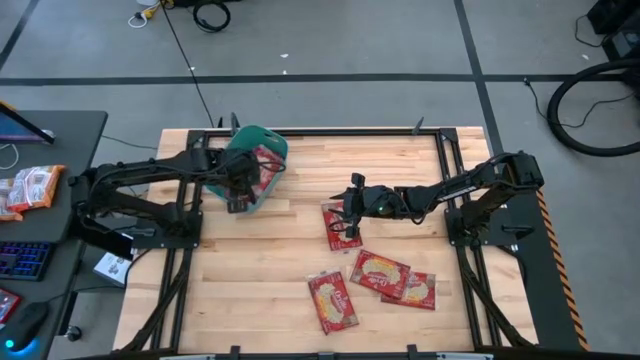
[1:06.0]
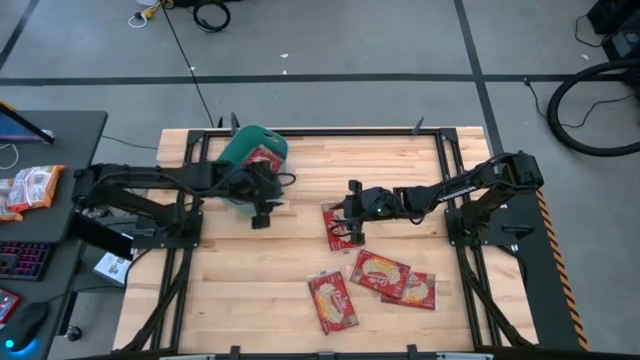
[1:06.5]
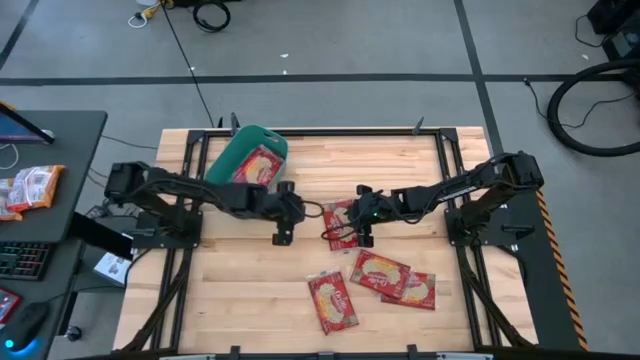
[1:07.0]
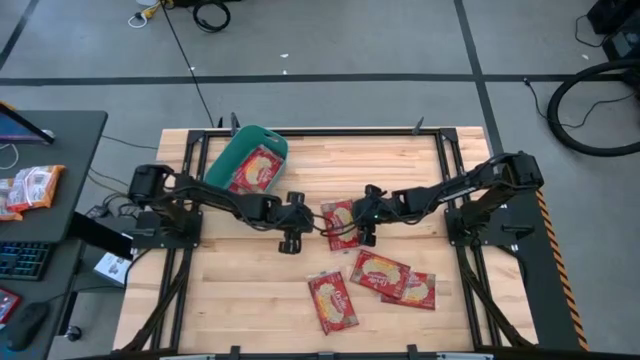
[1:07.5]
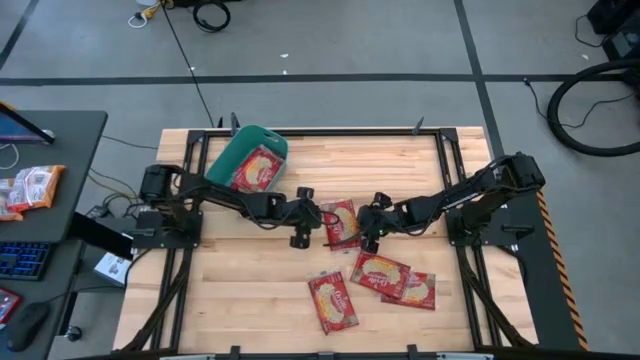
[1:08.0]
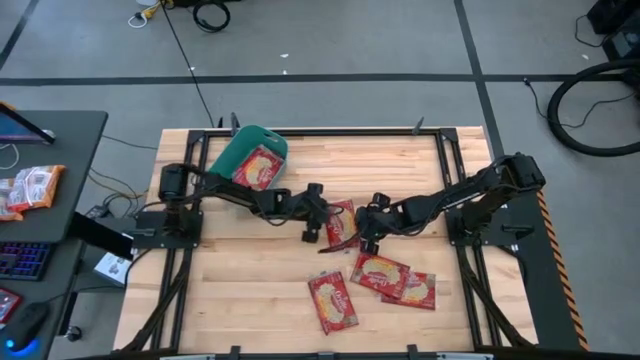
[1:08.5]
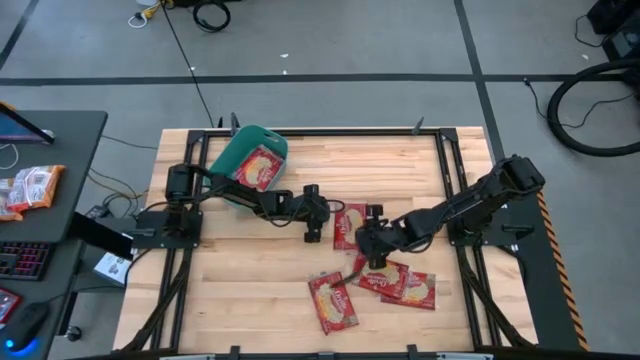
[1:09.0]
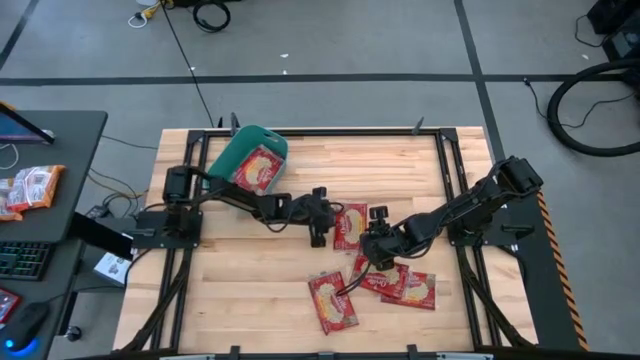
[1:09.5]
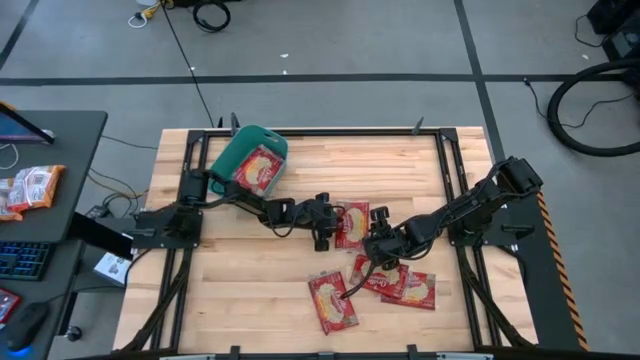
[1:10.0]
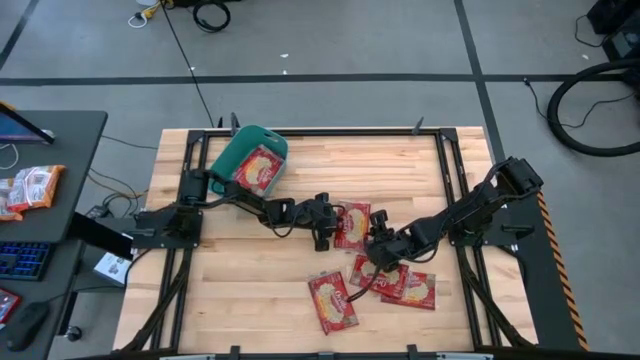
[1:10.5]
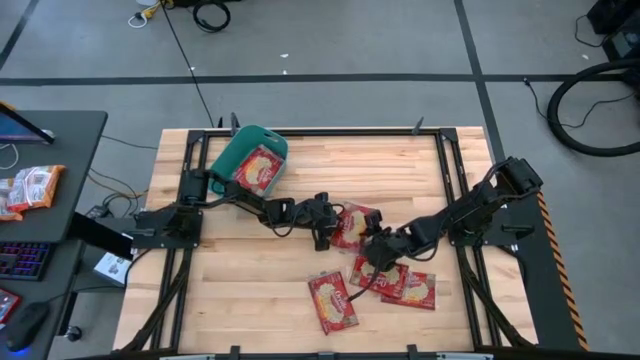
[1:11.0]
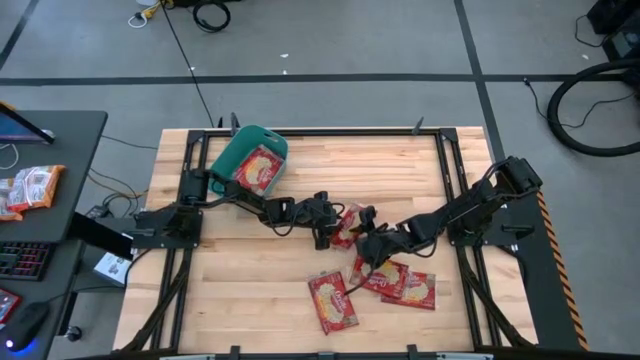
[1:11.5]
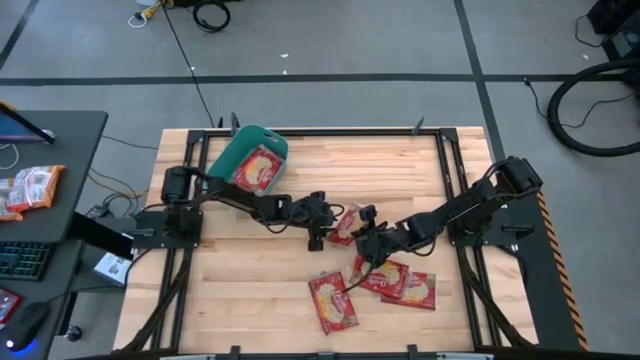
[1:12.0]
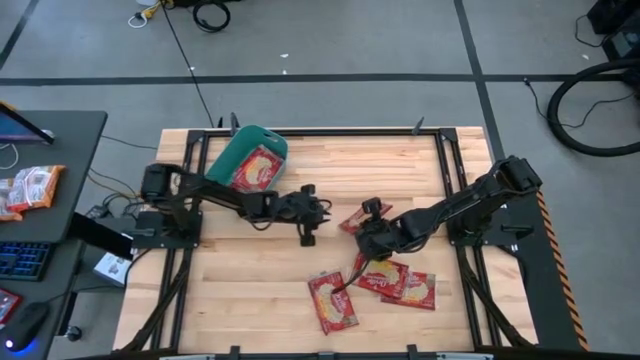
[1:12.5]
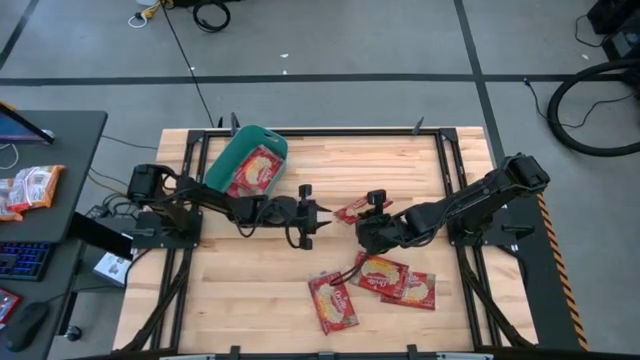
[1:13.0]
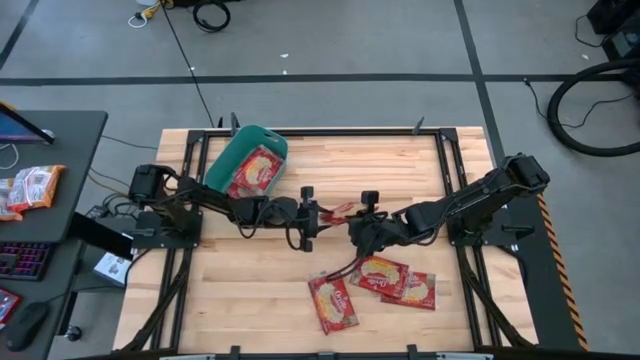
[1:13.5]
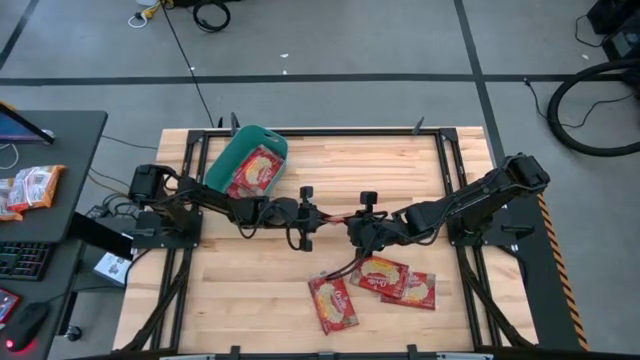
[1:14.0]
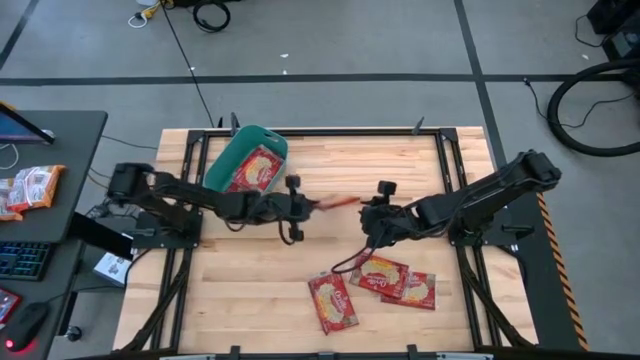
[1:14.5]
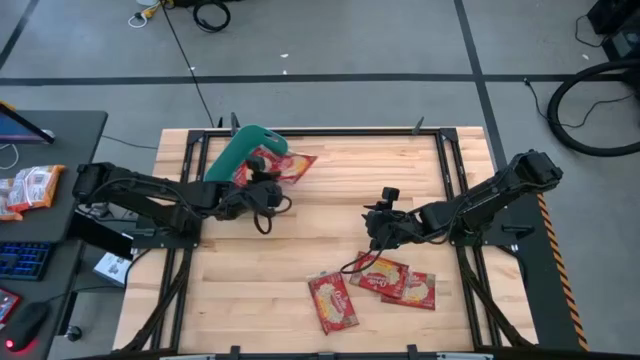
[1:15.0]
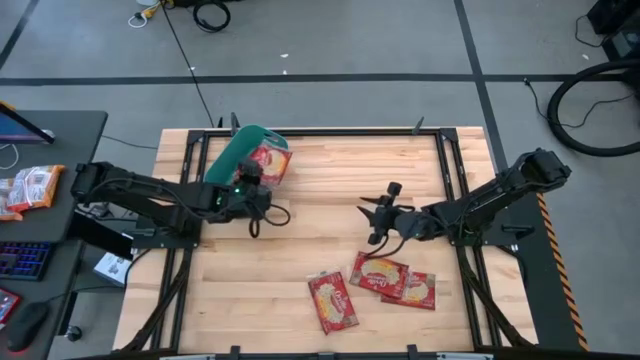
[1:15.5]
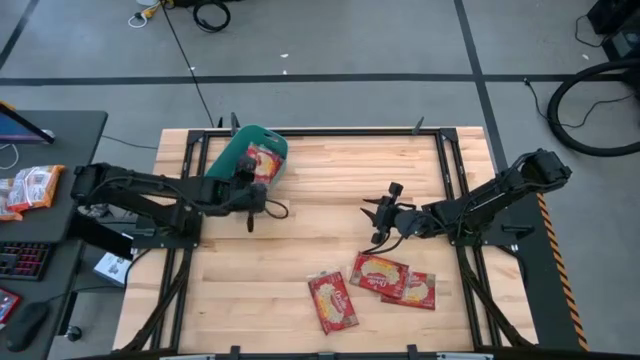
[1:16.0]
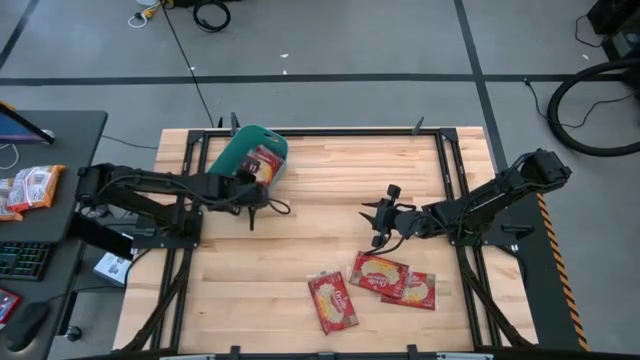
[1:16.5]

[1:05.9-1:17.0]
Task: Sort popcorn bags into baskets
Put the red popcorn bag into the green bin

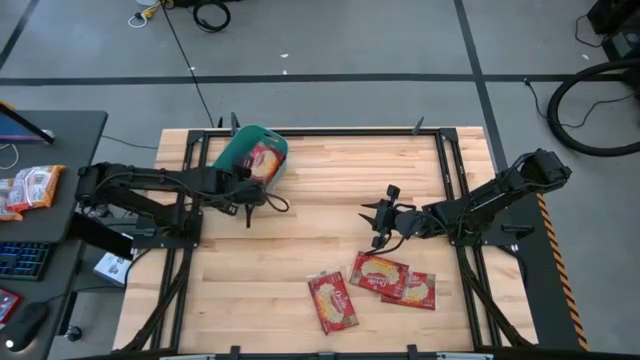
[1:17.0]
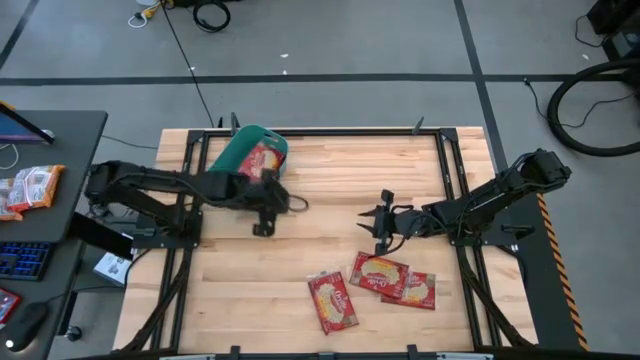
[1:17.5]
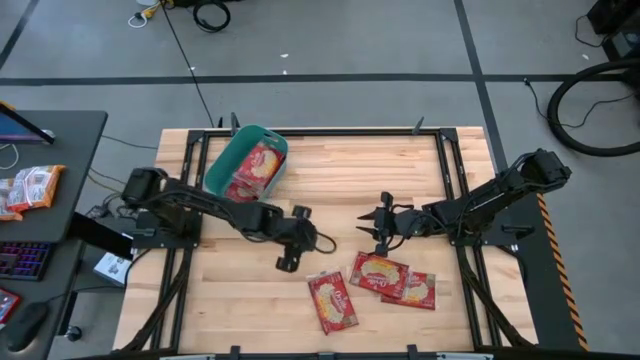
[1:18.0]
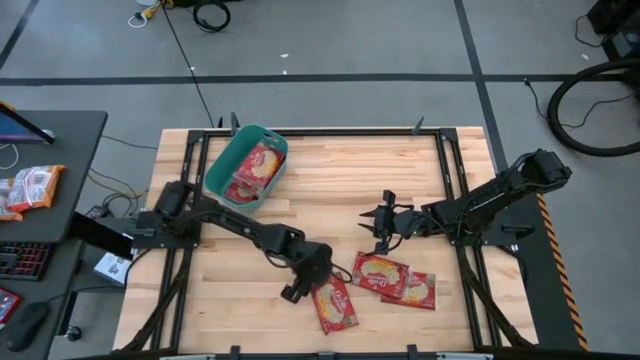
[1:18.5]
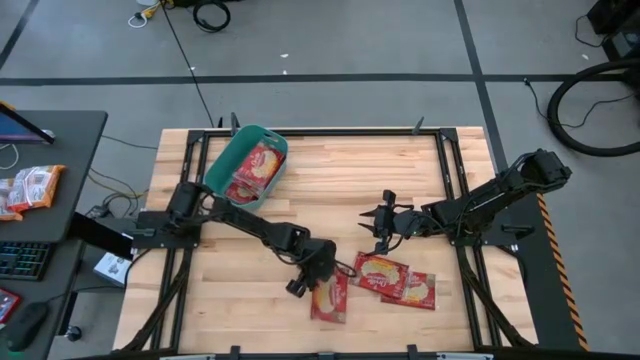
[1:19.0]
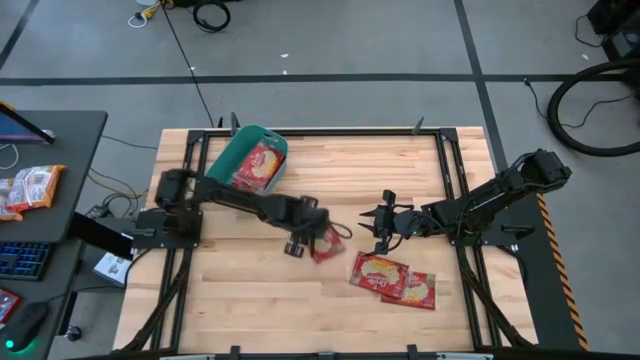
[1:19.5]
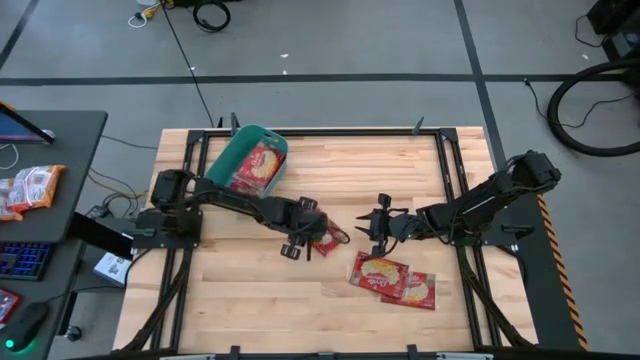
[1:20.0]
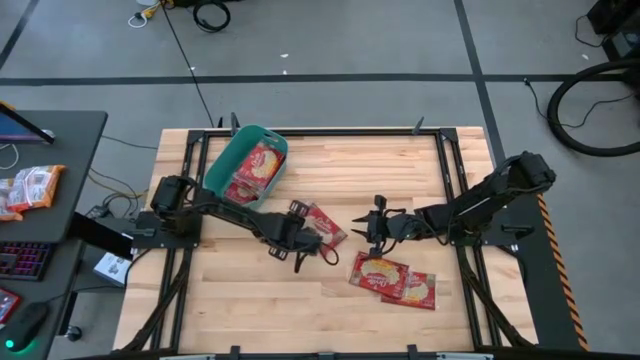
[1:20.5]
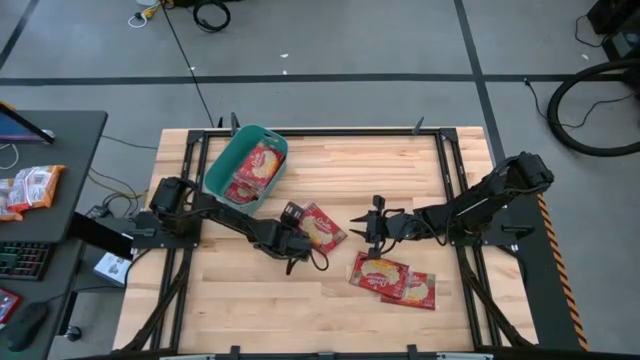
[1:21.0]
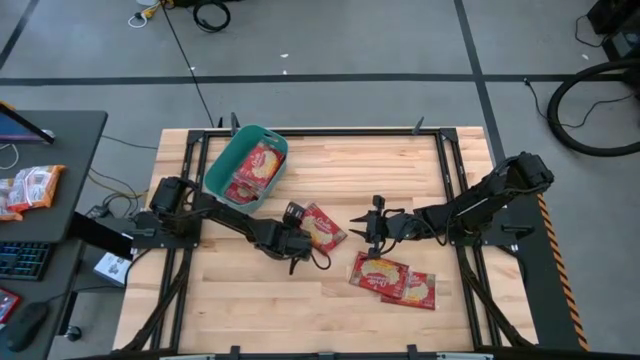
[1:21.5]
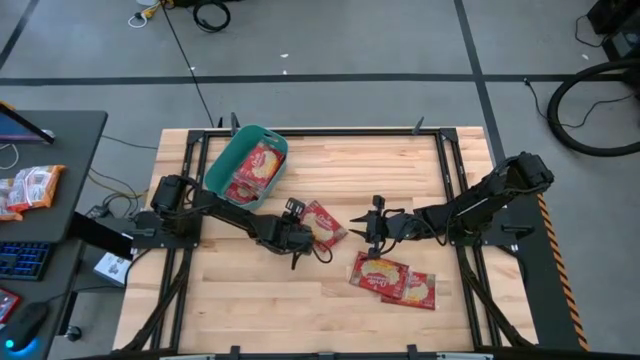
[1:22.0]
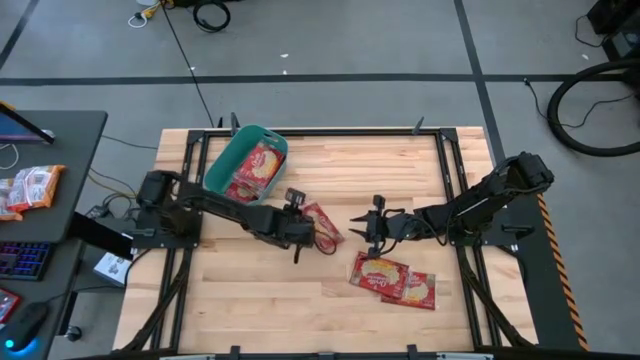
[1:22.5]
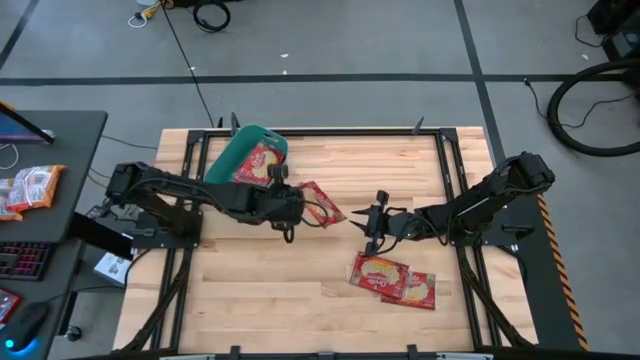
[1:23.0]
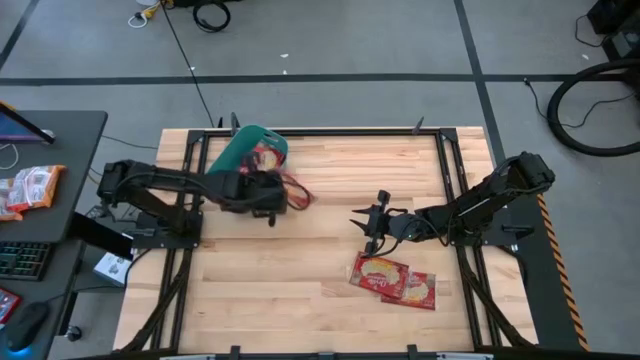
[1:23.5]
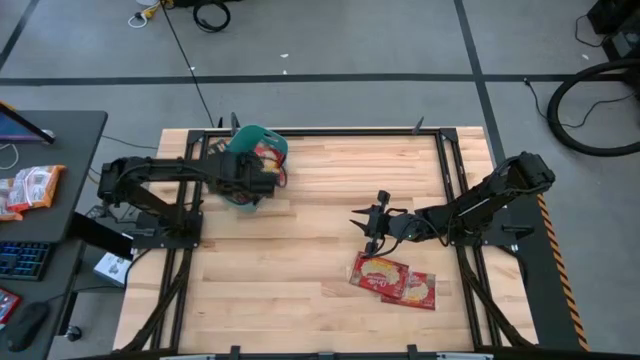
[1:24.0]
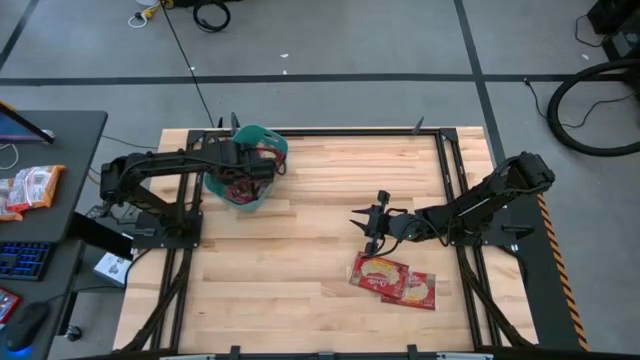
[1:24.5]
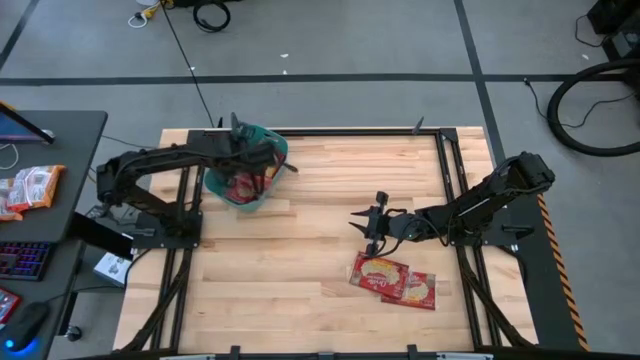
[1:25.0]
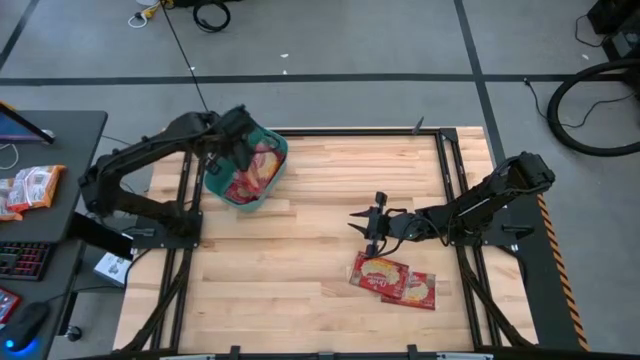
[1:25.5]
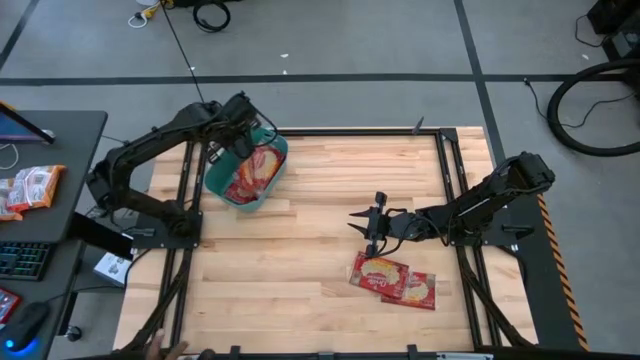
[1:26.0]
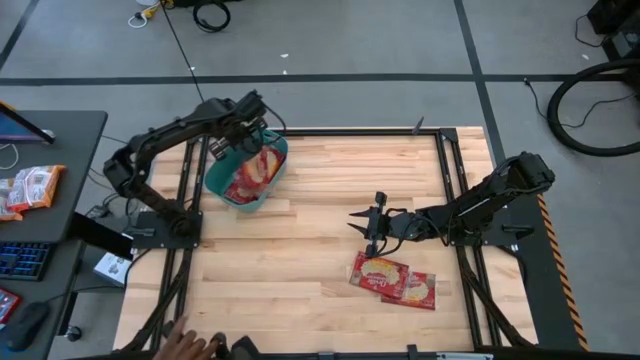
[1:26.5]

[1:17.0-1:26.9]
Put the red popcorn bag into the green bin

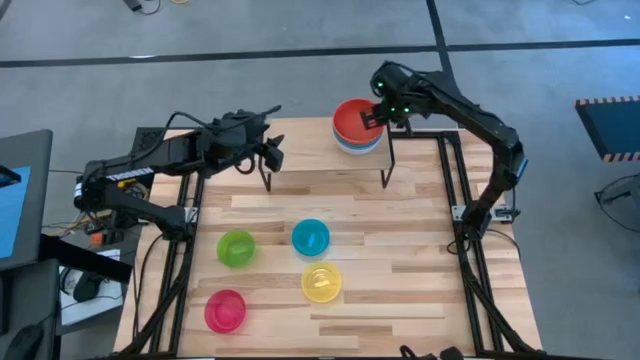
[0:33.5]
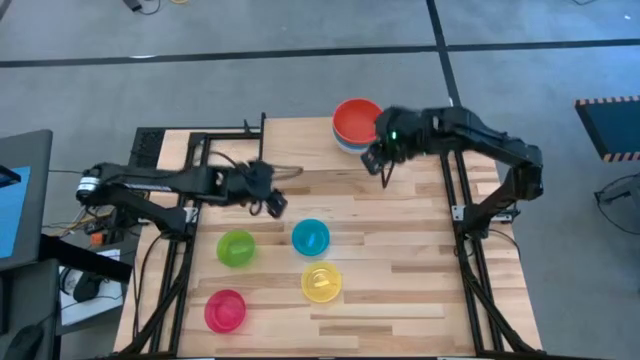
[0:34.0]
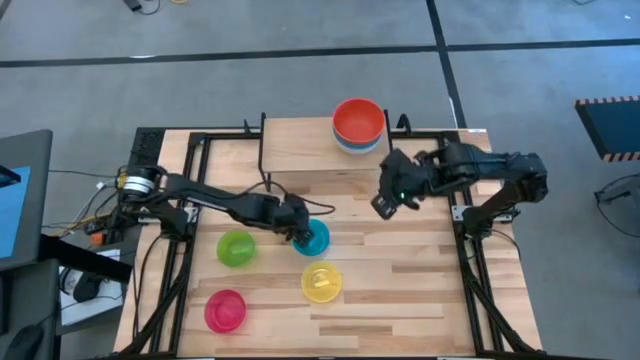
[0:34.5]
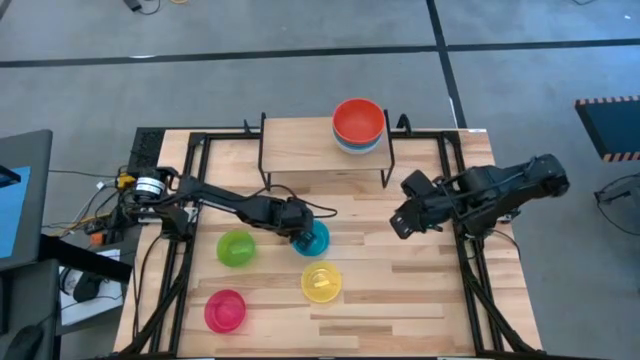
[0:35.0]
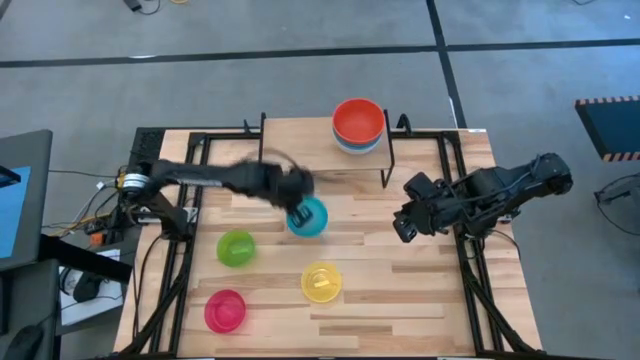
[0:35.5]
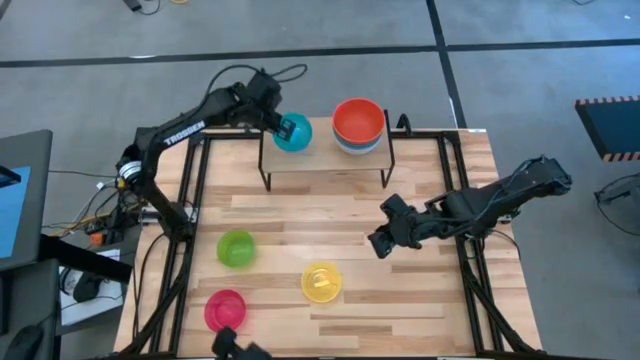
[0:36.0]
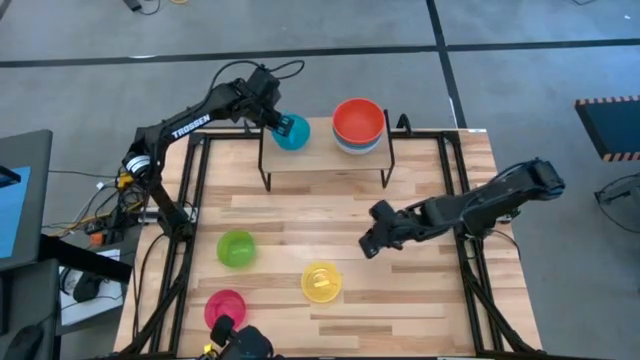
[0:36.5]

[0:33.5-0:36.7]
Task: Place and stack bowls onto a shelf
Put the small blue bowl on the shelf
